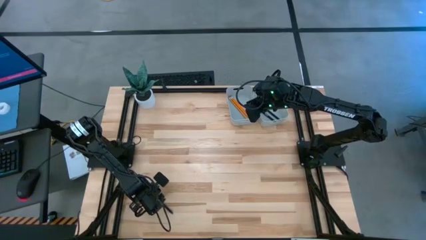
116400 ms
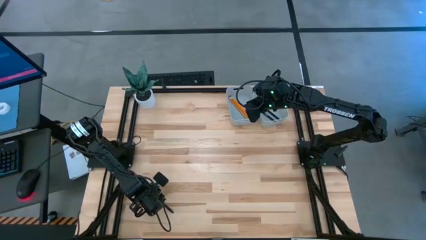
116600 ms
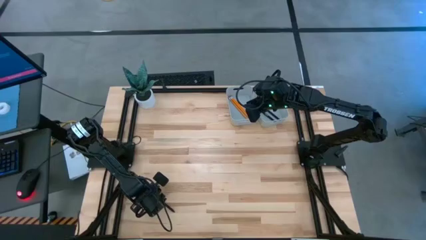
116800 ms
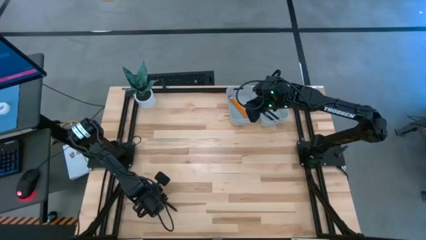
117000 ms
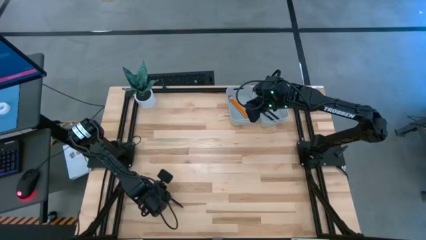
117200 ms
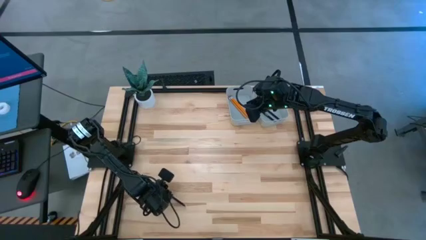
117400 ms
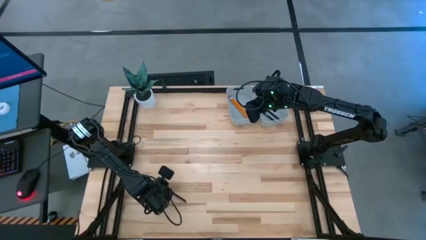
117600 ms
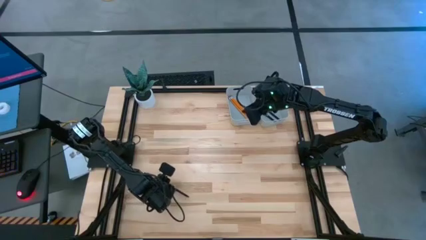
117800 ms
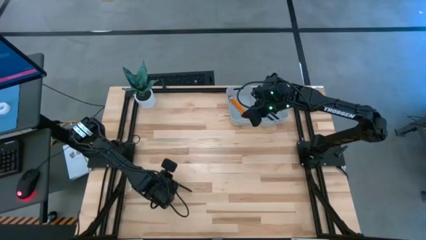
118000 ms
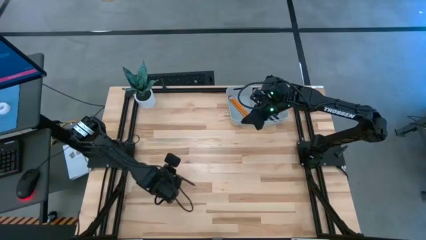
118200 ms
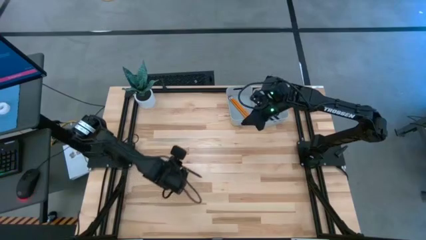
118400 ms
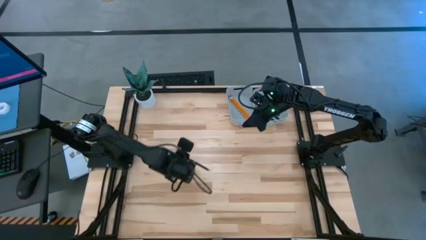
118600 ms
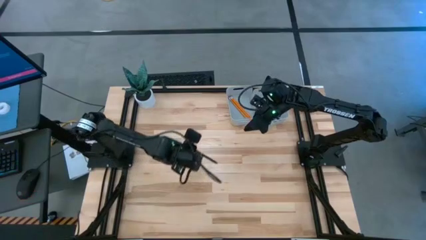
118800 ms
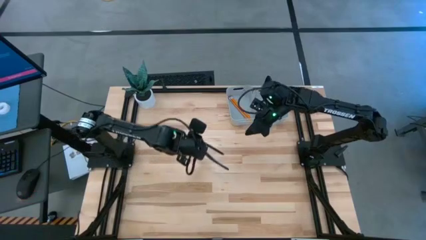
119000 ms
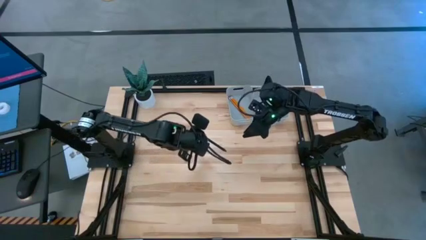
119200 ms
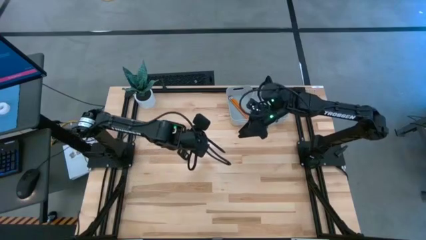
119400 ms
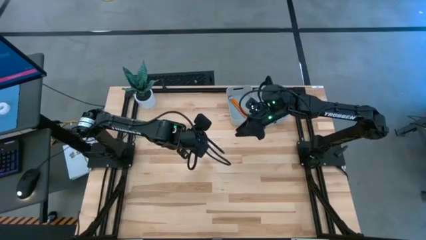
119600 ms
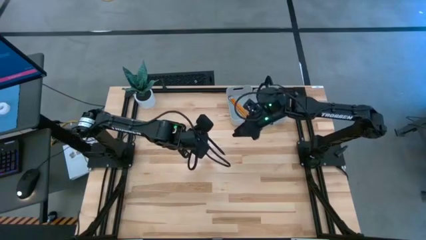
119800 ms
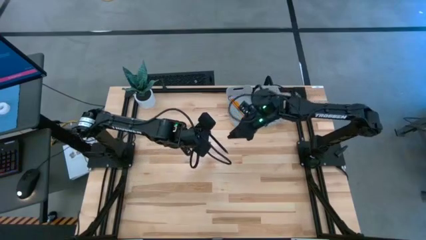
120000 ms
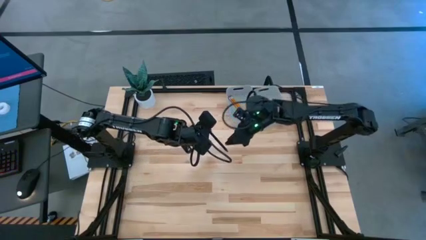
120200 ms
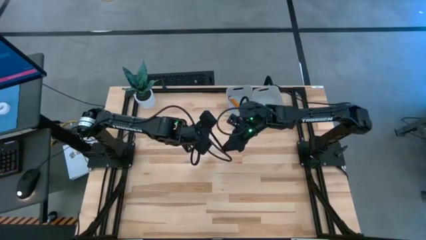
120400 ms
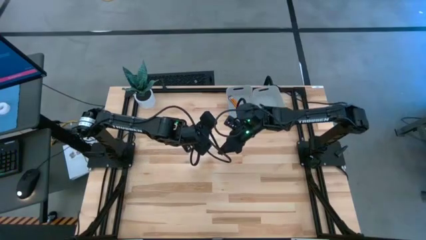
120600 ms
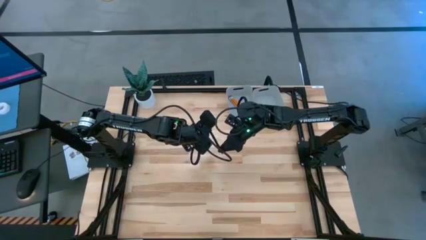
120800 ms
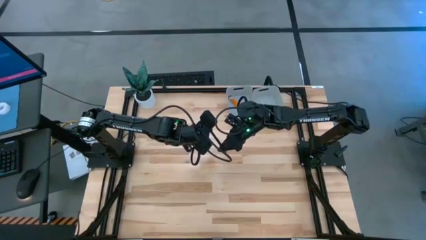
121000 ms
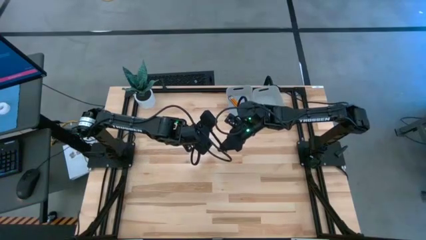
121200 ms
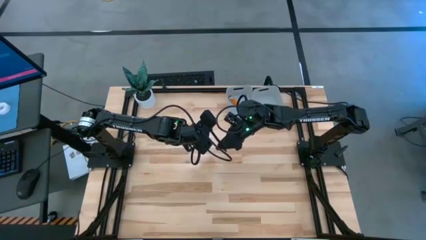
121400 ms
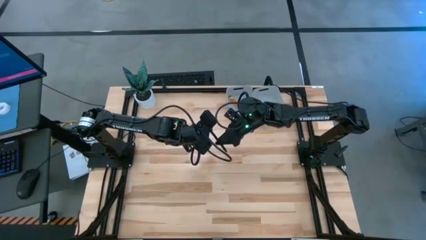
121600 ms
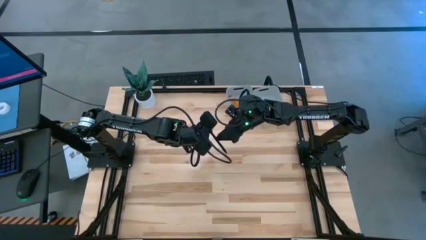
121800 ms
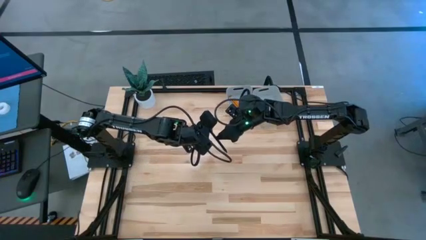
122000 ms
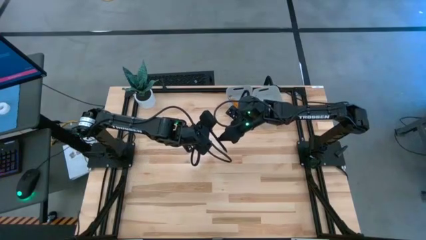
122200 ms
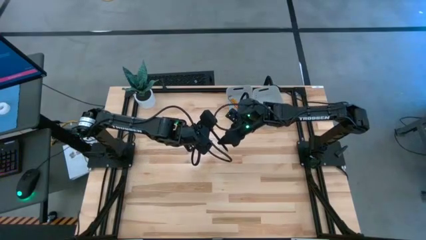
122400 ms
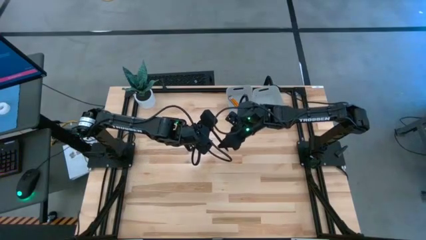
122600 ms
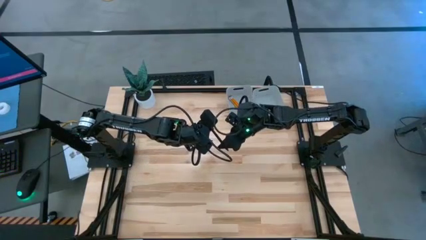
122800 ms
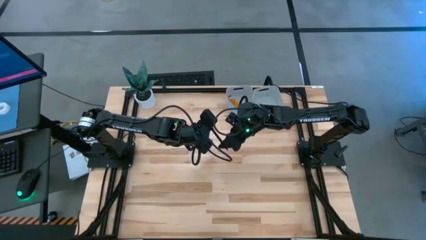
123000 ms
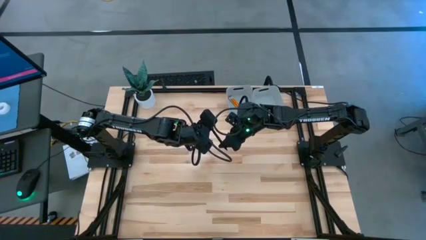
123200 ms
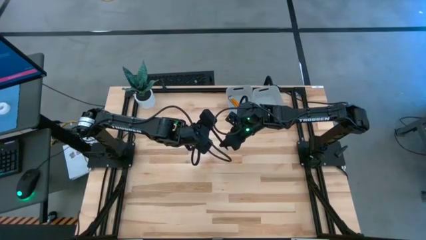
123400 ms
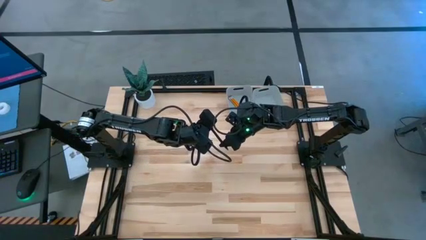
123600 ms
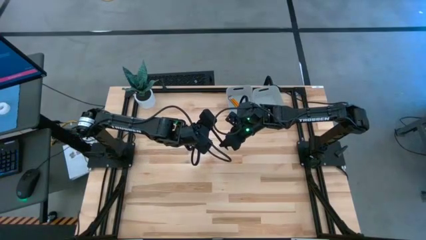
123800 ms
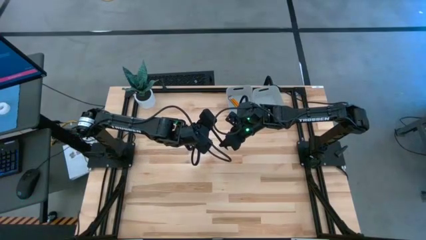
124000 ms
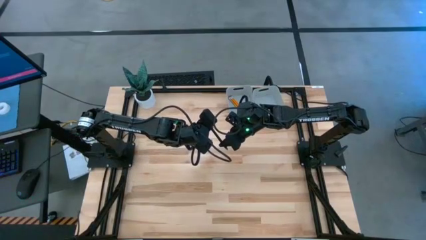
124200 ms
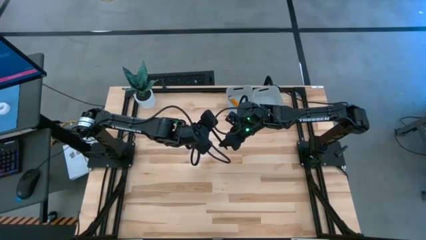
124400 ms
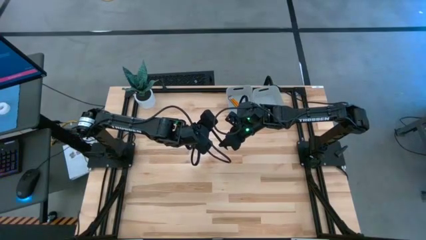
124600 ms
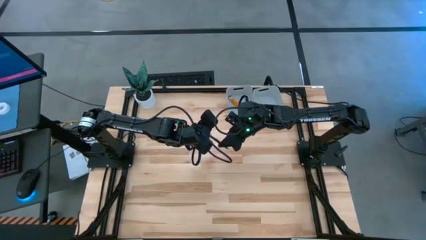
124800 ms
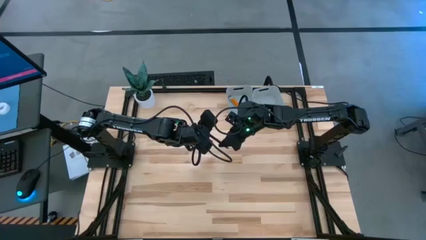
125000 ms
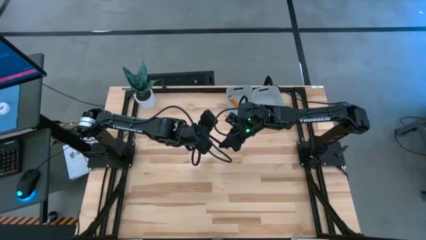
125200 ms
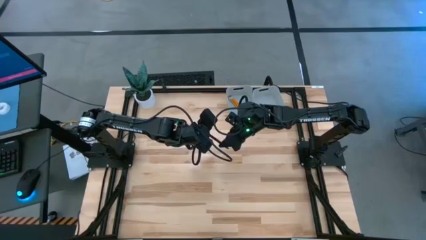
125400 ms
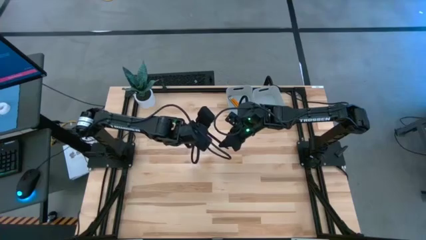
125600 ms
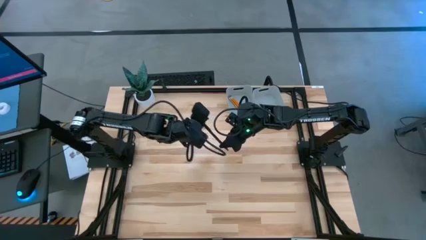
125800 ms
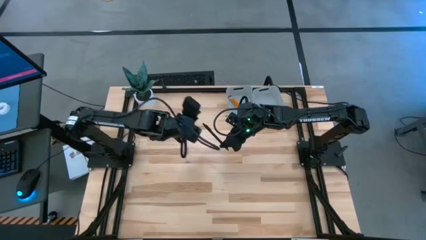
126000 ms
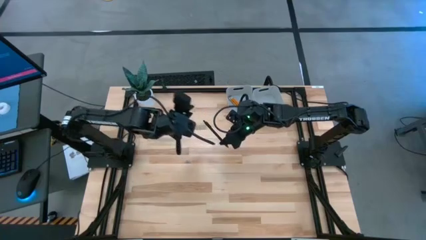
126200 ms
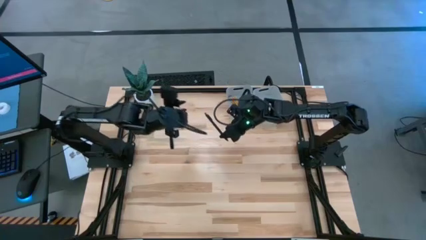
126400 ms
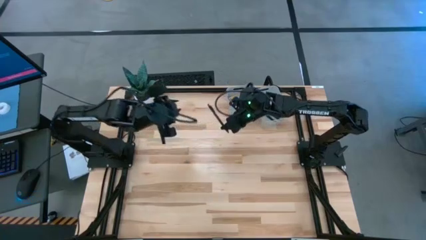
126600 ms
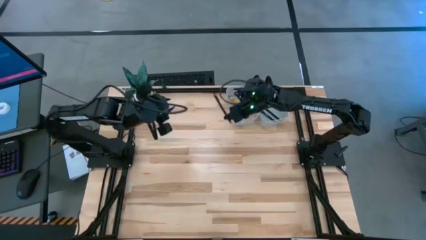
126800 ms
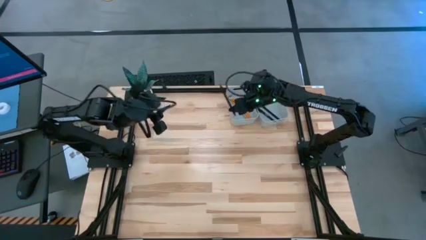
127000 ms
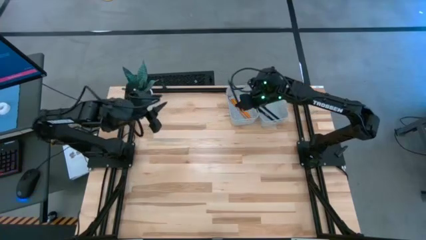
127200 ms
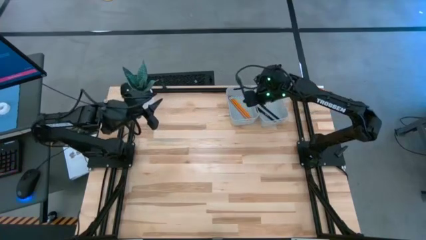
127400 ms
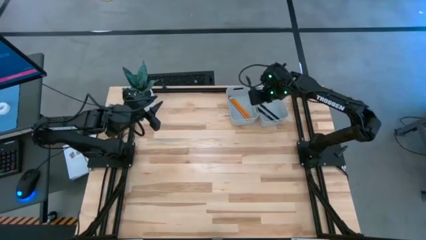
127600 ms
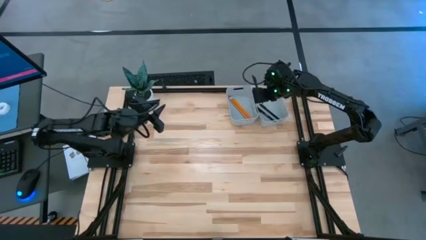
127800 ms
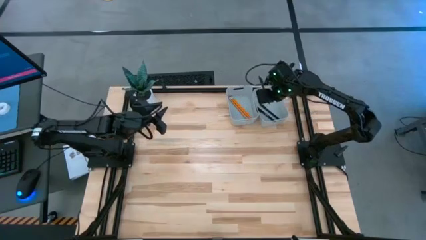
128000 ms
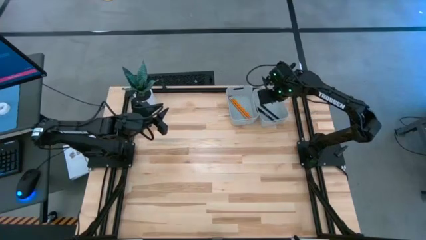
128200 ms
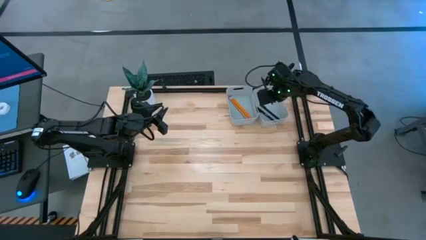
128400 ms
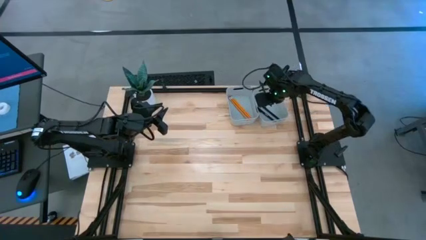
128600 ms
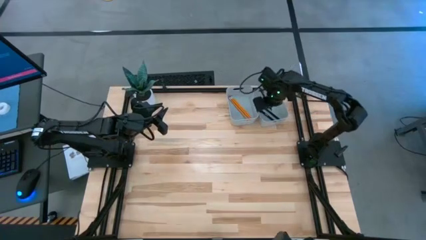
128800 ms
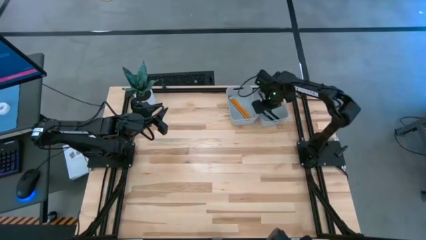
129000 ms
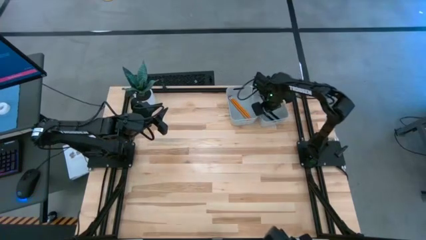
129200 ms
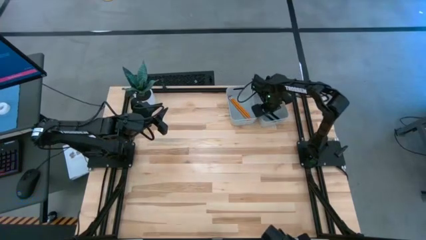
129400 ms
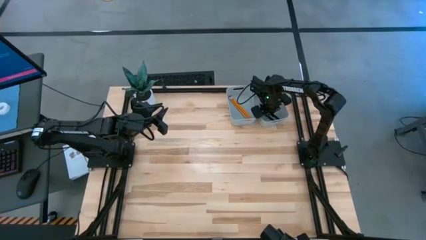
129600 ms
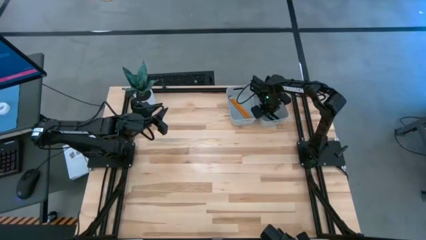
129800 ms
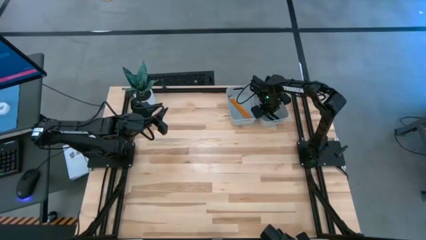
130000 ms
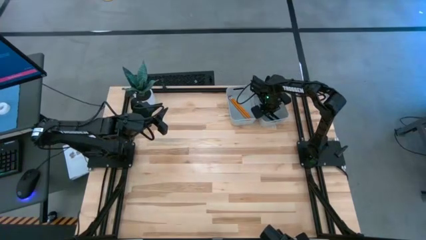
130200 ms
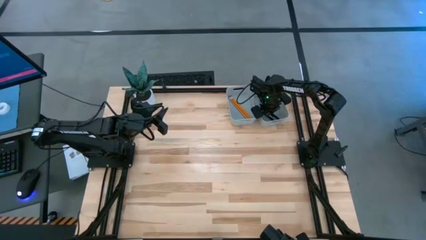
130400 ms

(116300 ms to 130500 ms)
Task: Sort pens & pencils
Put the black pen into the right gray bin
